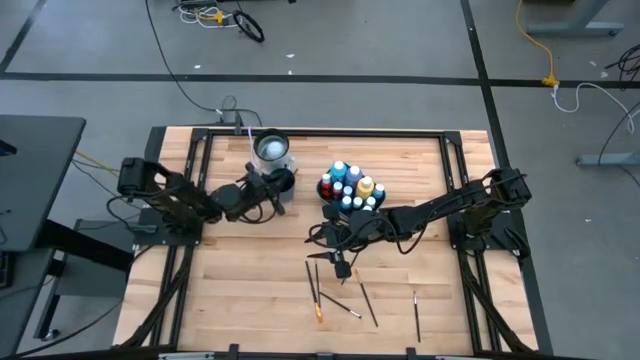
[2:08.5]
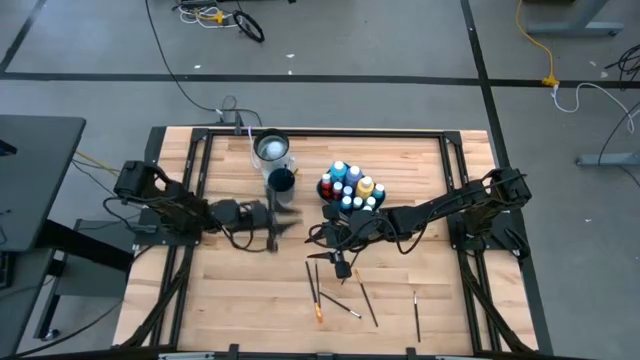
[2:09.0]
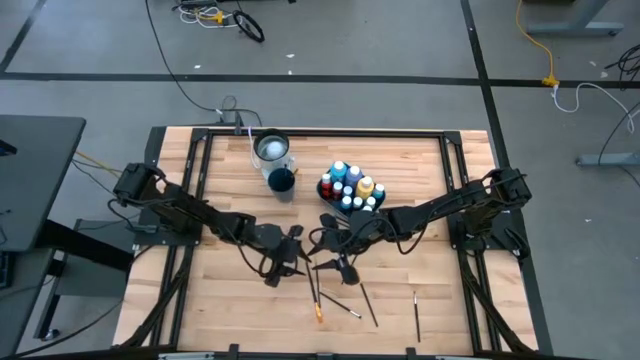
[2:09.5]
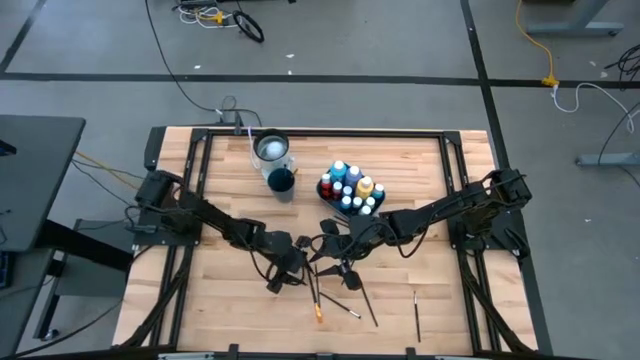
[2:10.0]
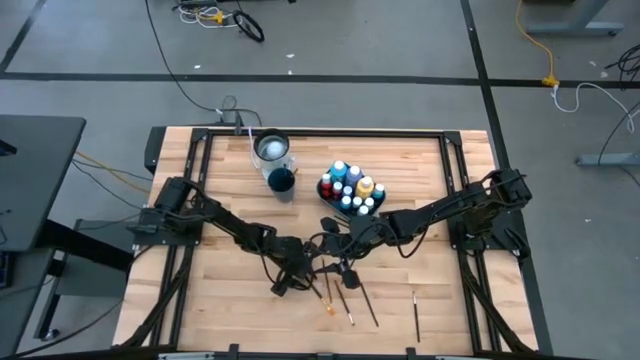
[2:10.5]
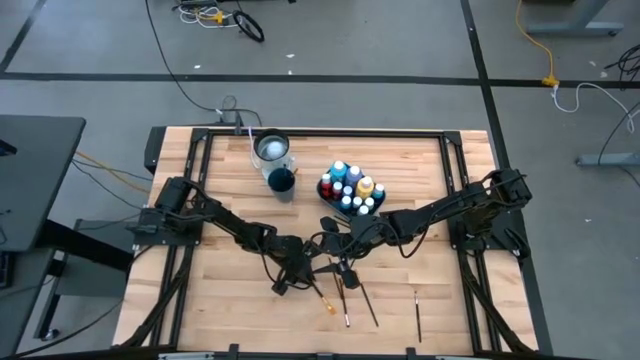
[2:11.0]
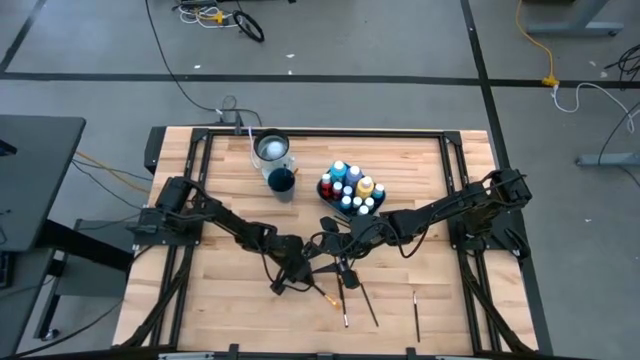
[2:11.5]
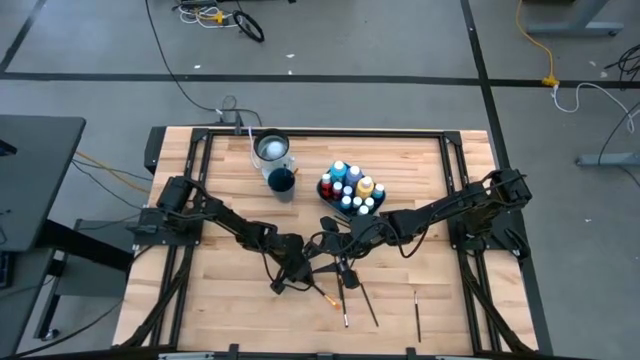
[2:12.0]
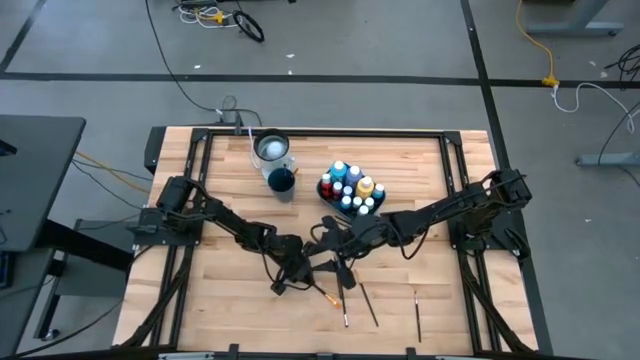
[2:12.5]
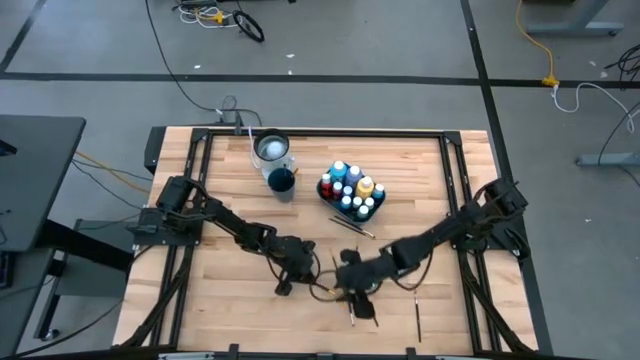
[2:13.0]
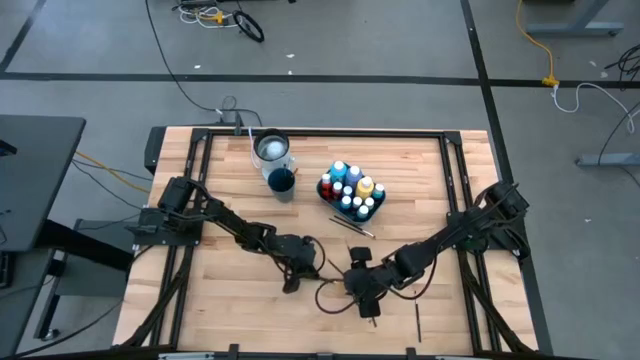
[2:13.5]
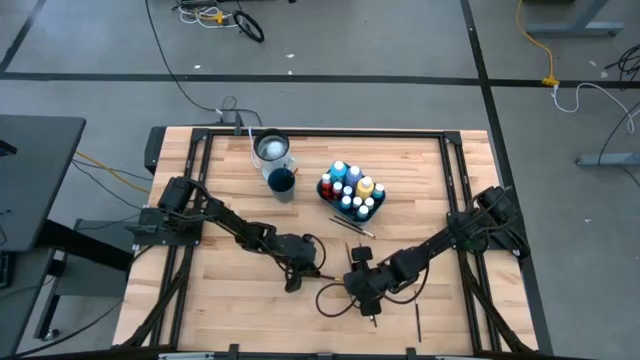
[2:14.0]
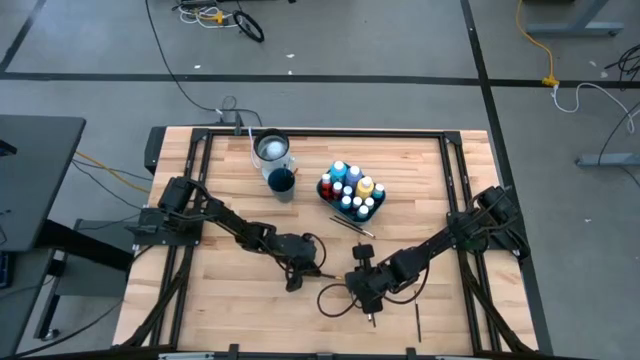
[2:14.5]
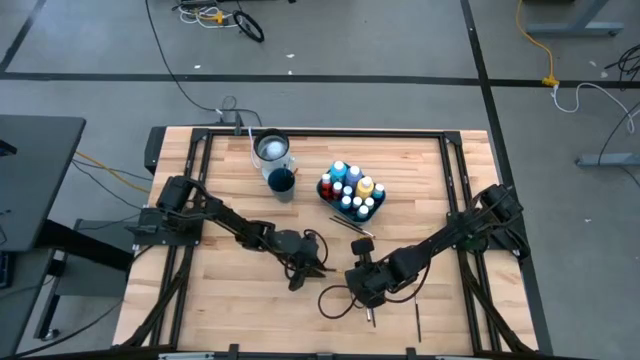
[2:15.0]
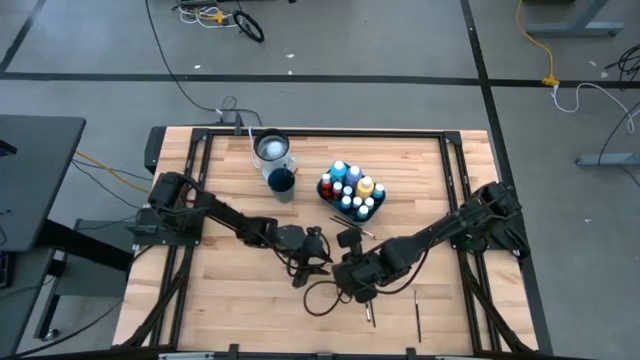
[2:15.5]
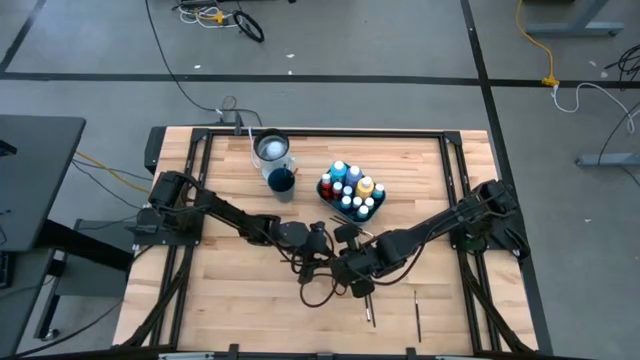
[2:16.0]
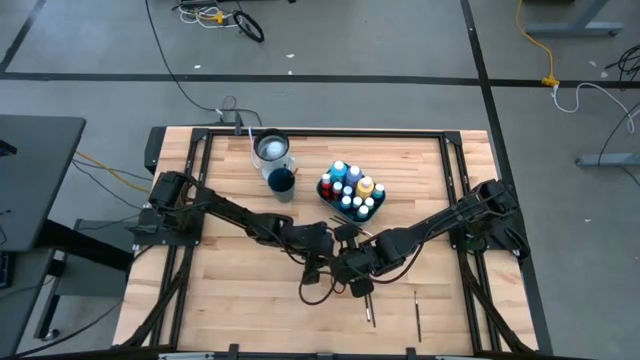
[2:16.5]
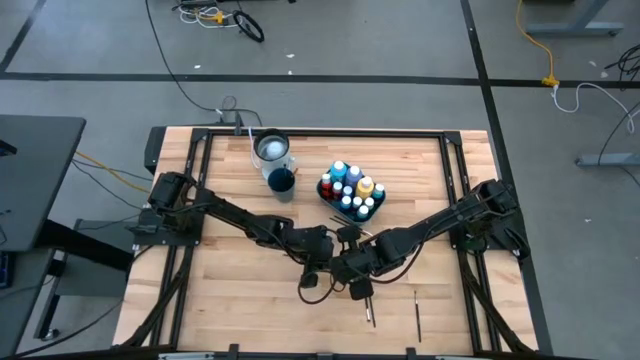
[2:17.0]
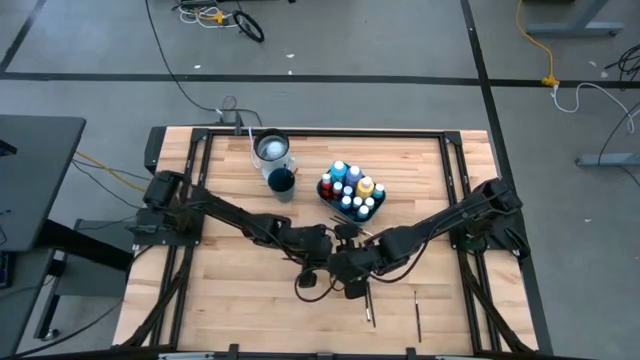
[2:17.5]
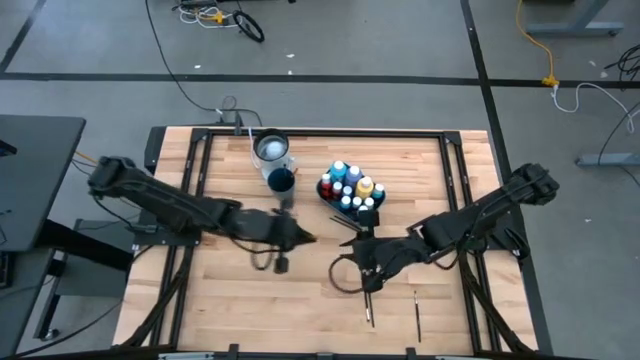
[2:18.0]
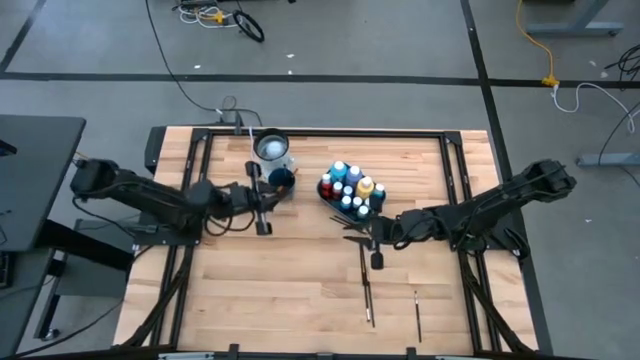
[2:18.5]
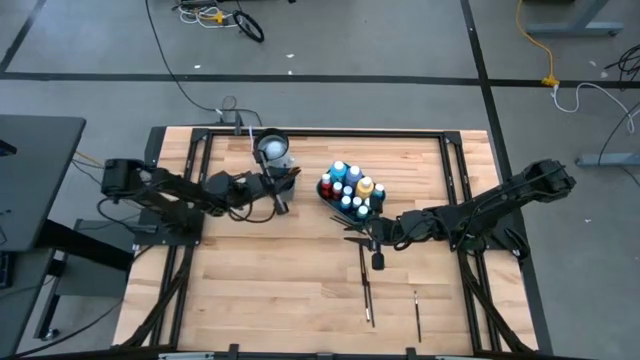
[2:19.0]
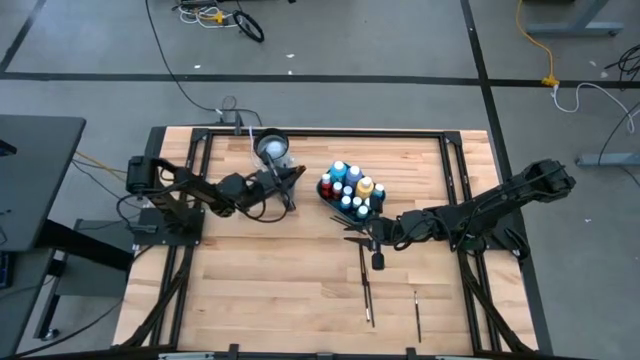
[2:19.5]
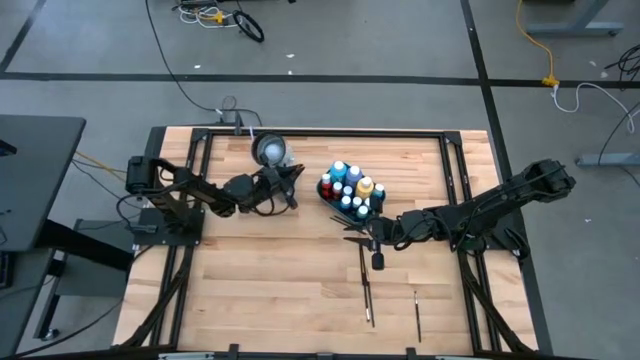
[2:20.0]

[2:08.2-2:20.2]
Task: Pick & Place Paint Supplies
Put the gold paint brush into the blue cup

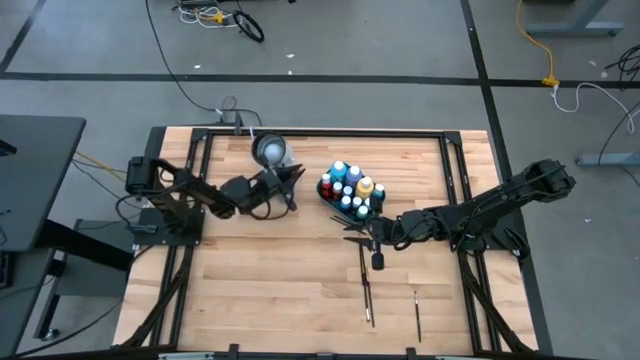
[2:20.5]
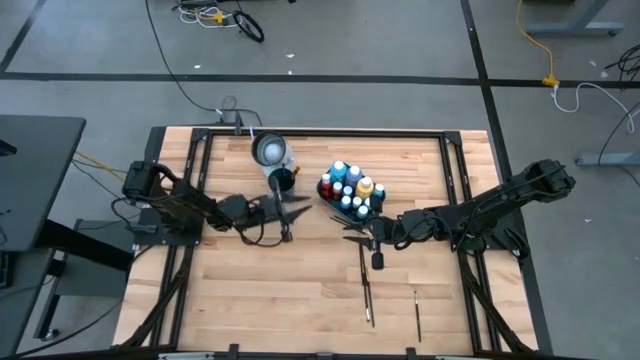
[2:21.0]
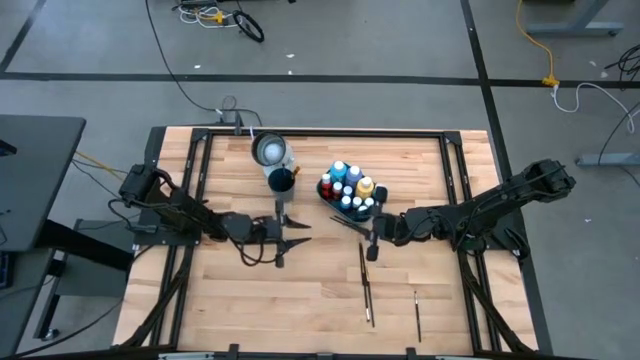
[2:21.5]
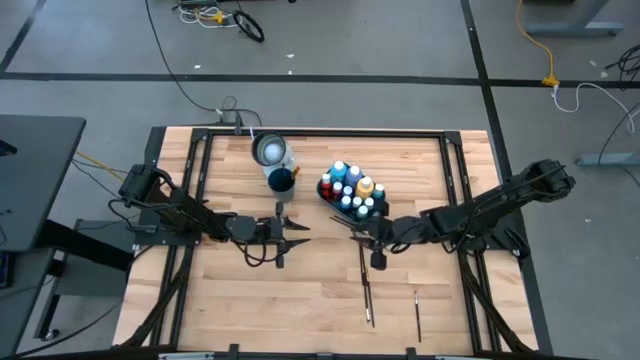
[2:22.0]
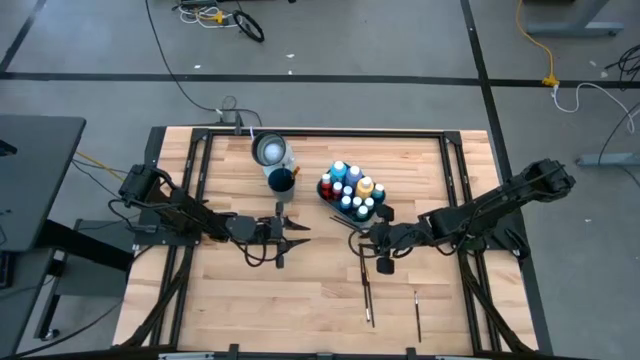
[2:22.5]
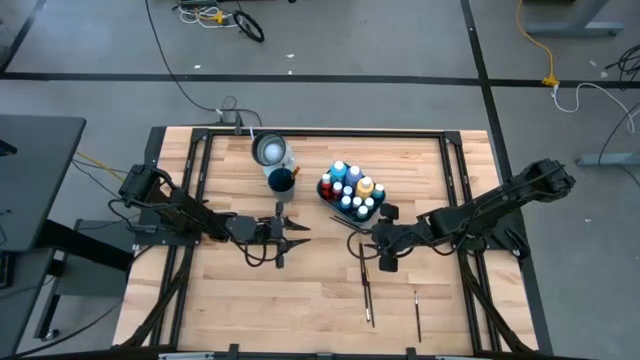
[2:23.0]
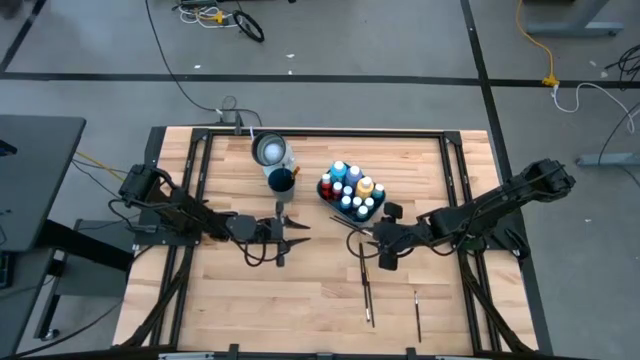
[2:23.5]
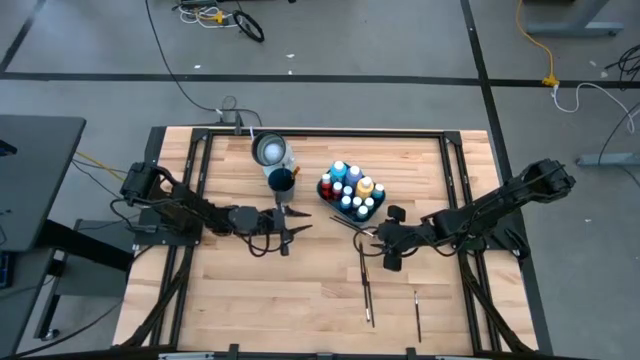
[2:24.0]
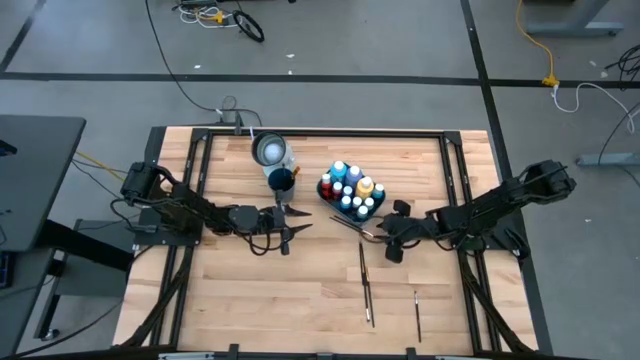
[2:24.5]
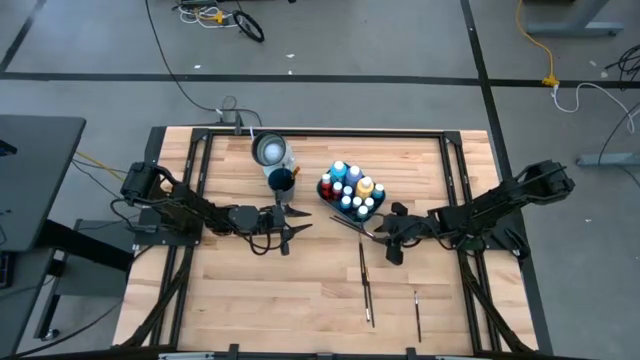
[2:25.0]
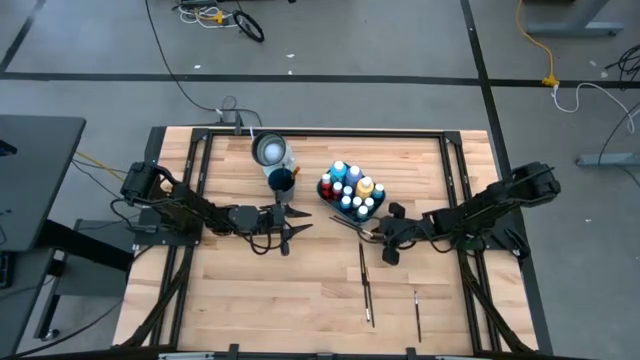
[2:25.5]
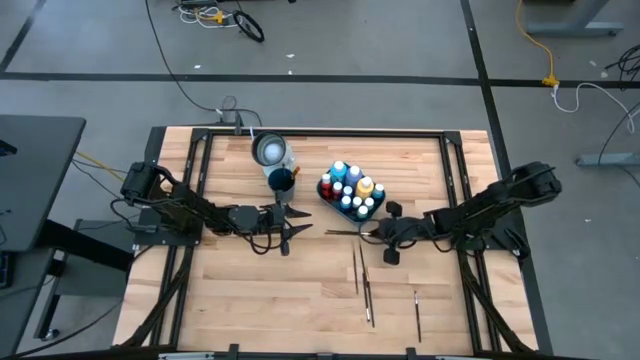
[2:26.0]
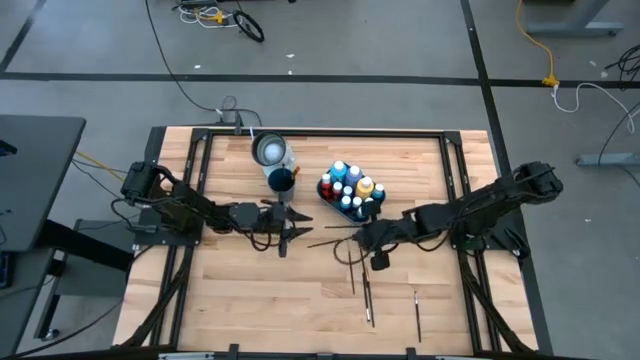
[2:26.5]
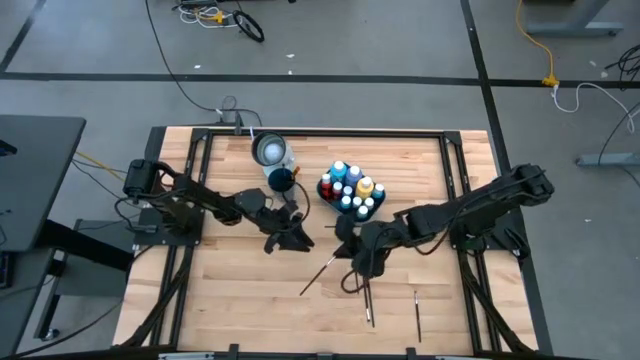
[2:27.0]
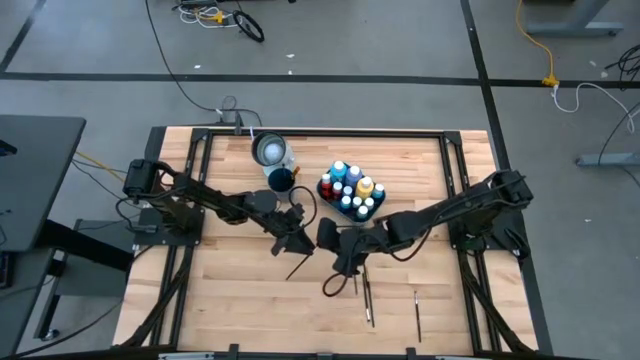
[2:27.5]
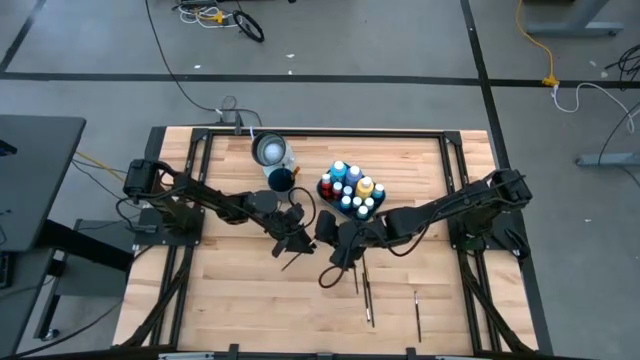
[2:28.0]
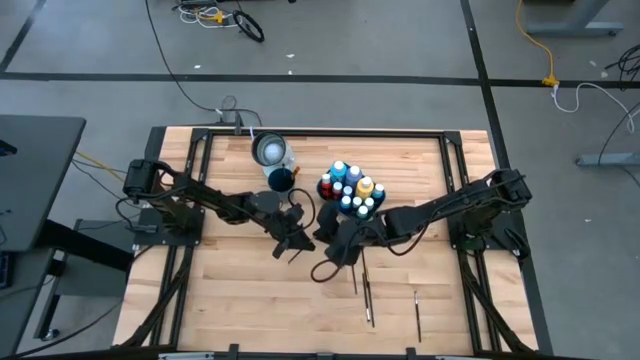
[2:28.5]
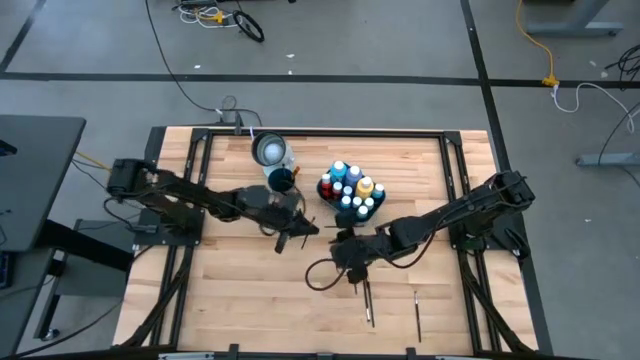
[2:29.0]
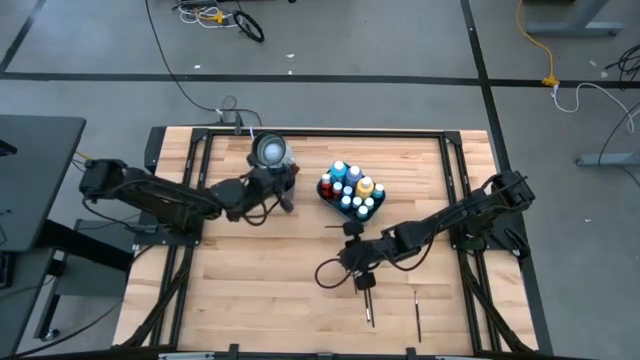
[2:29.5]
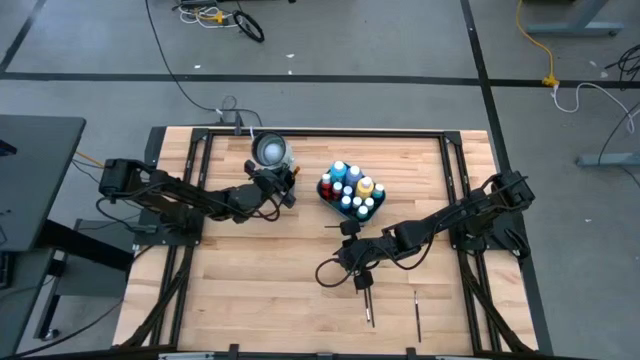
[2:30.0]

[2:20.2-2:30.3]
Put the silver paint brush into the blue cup
